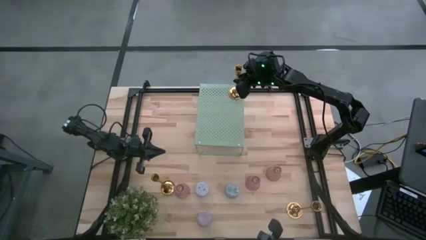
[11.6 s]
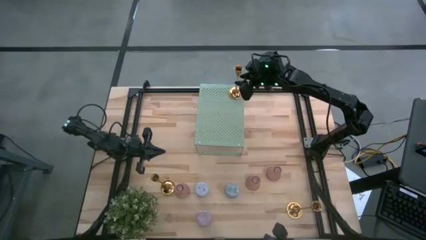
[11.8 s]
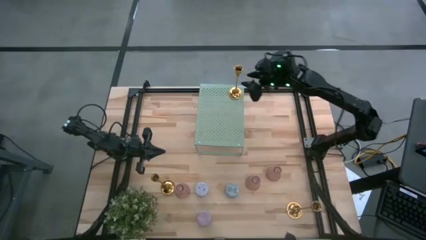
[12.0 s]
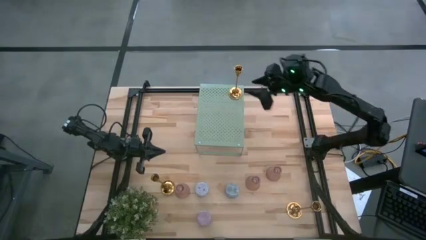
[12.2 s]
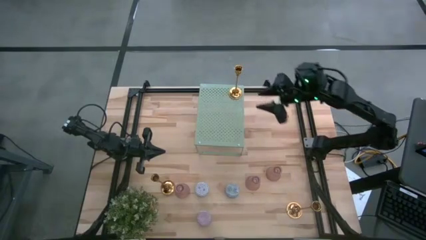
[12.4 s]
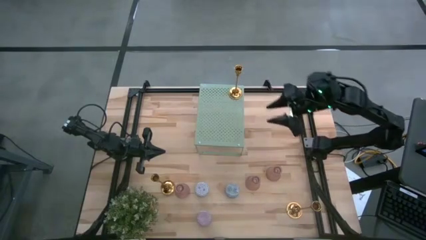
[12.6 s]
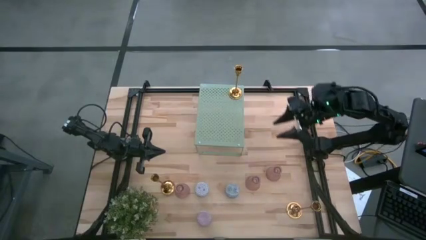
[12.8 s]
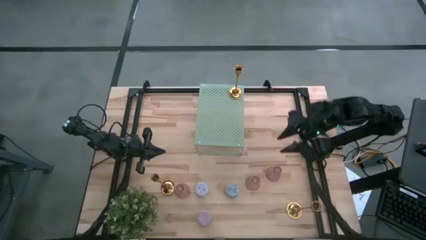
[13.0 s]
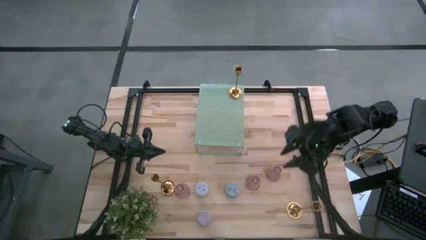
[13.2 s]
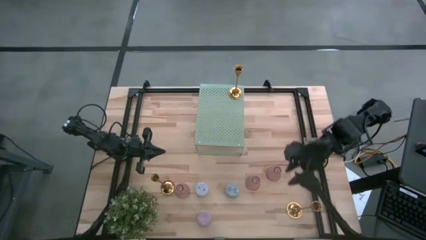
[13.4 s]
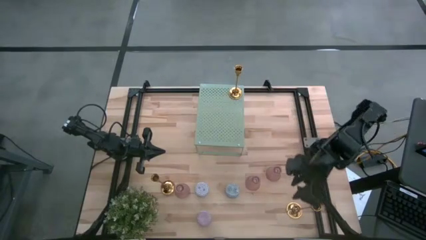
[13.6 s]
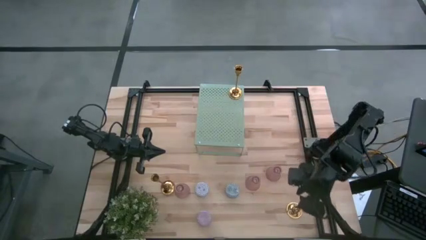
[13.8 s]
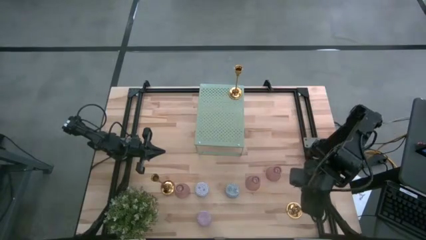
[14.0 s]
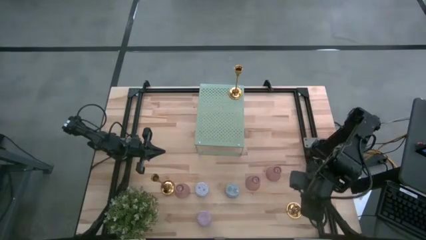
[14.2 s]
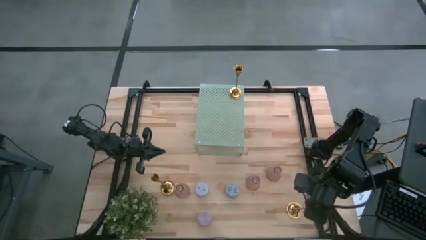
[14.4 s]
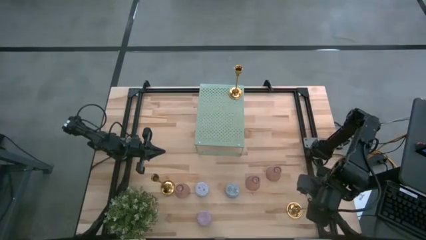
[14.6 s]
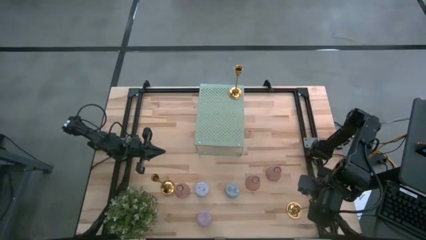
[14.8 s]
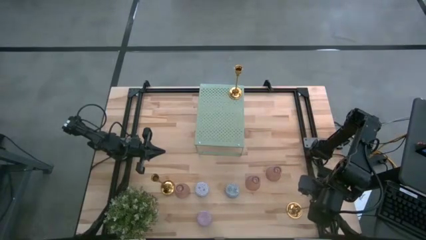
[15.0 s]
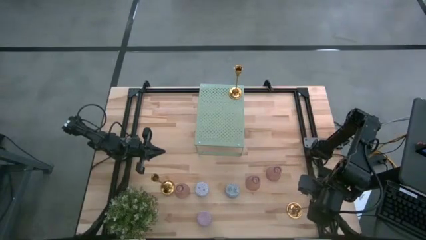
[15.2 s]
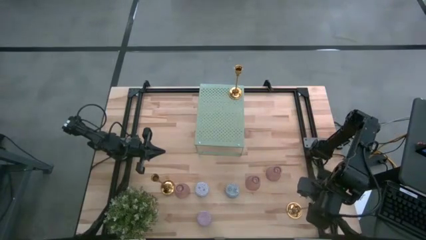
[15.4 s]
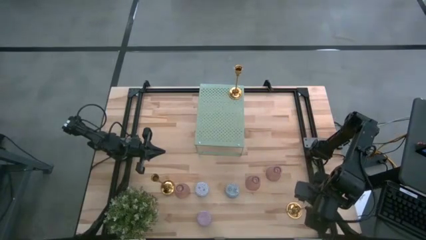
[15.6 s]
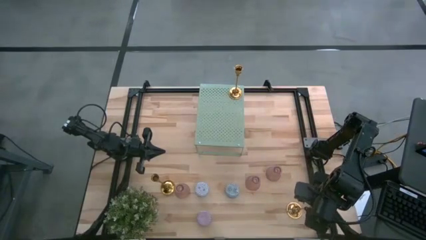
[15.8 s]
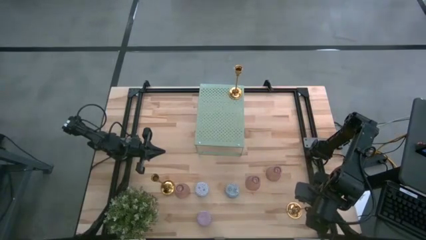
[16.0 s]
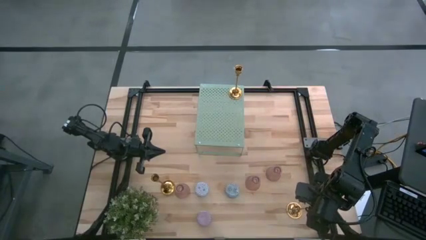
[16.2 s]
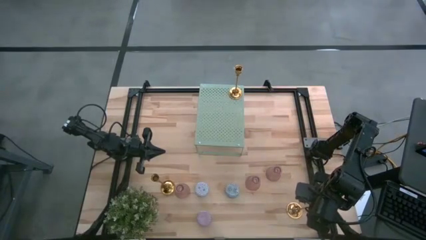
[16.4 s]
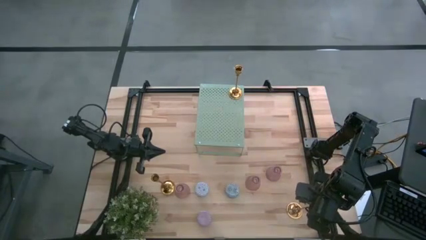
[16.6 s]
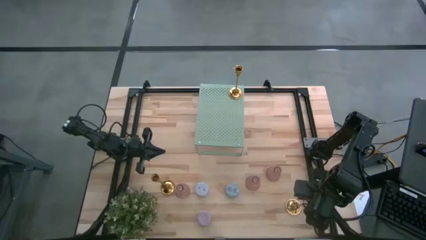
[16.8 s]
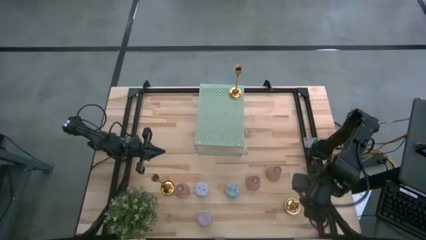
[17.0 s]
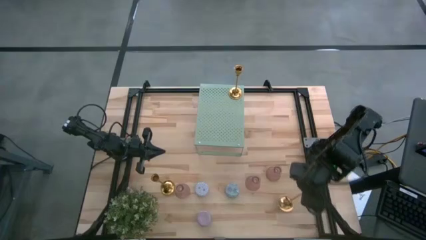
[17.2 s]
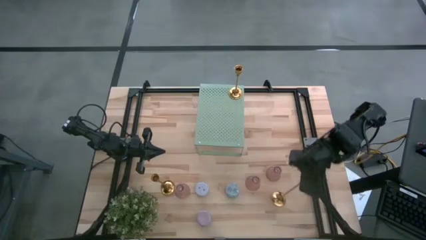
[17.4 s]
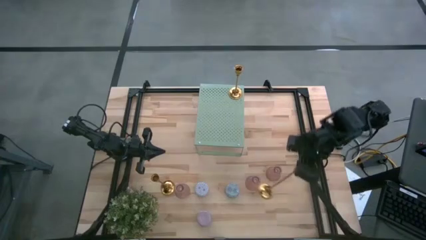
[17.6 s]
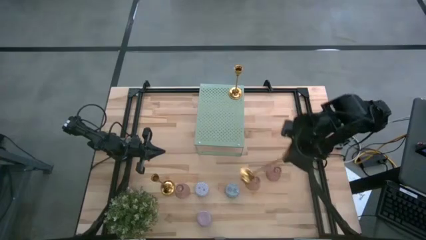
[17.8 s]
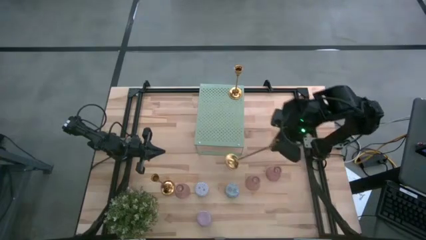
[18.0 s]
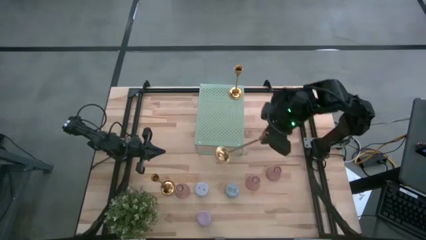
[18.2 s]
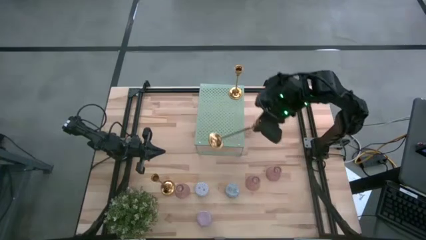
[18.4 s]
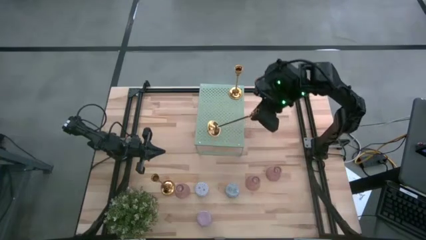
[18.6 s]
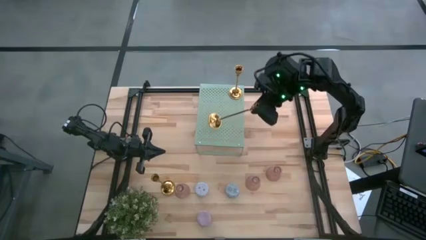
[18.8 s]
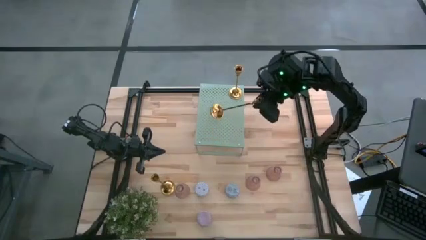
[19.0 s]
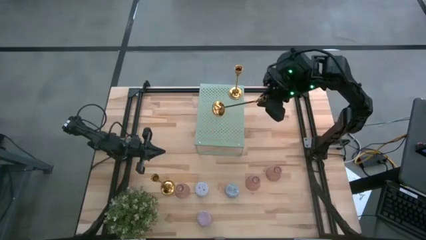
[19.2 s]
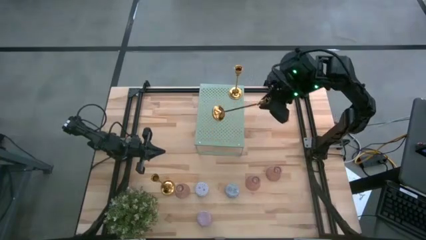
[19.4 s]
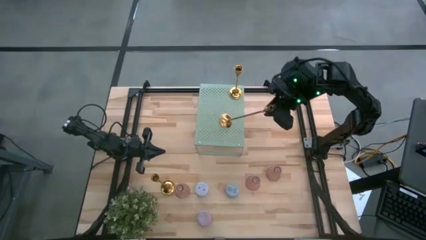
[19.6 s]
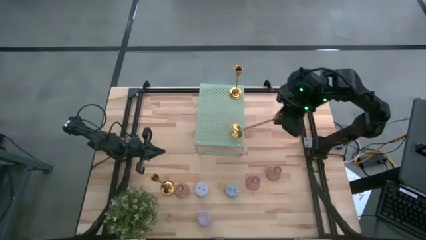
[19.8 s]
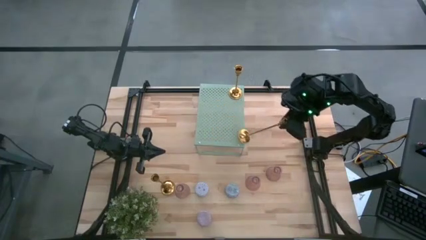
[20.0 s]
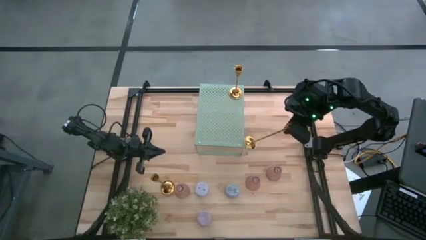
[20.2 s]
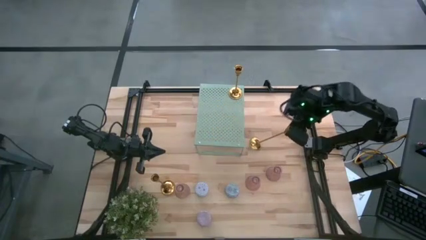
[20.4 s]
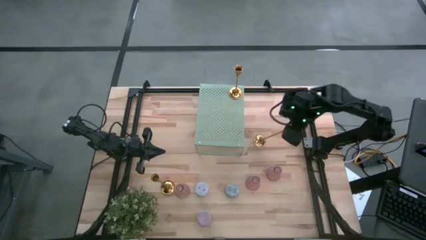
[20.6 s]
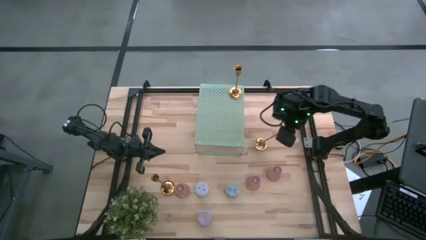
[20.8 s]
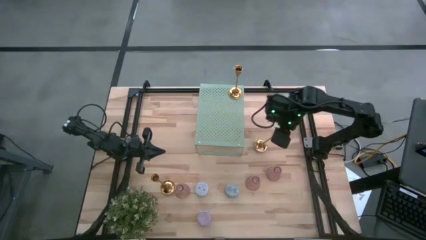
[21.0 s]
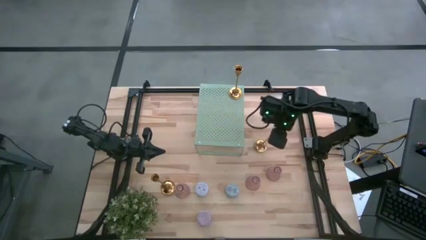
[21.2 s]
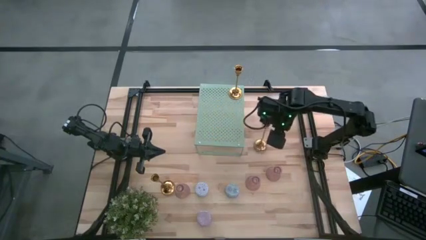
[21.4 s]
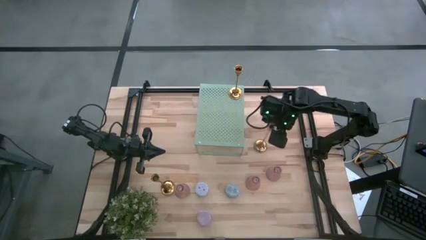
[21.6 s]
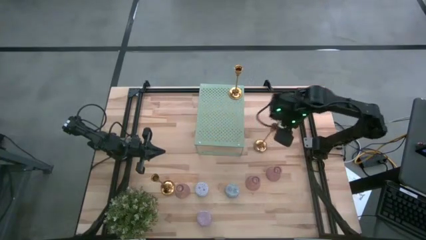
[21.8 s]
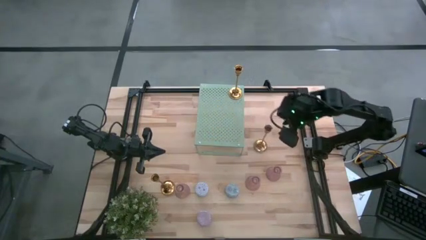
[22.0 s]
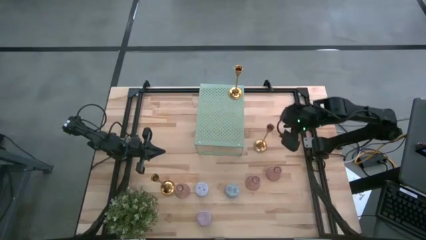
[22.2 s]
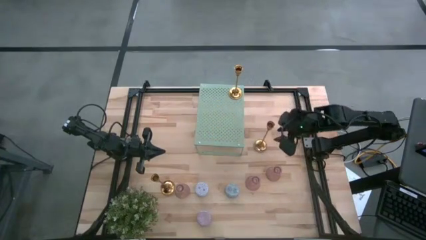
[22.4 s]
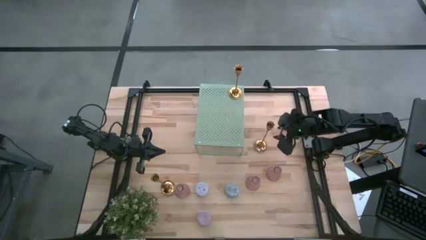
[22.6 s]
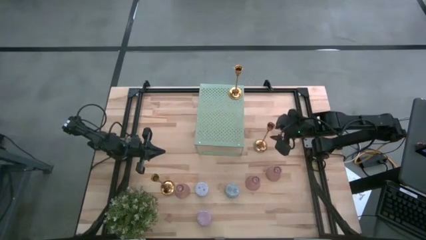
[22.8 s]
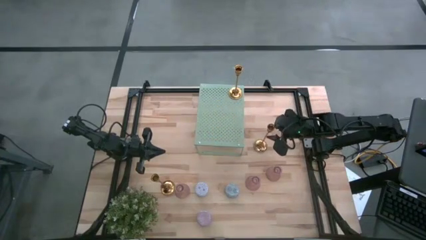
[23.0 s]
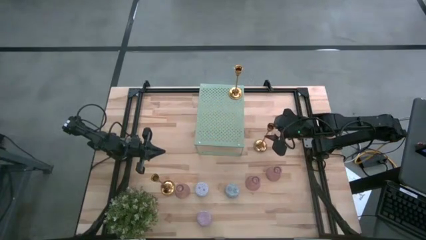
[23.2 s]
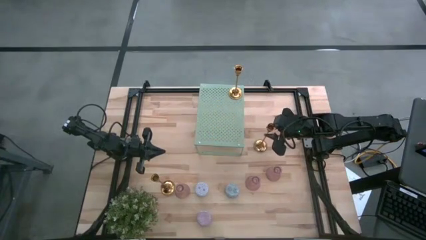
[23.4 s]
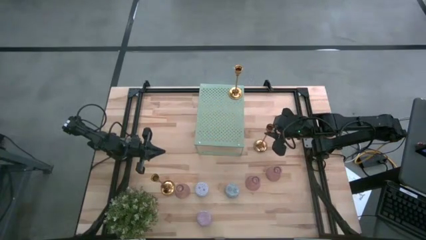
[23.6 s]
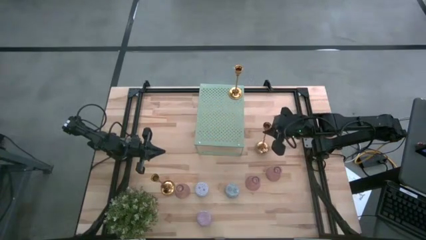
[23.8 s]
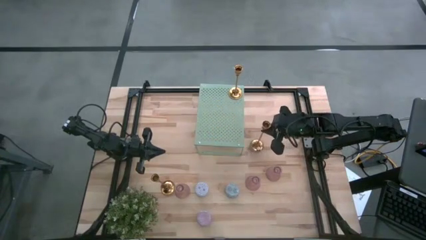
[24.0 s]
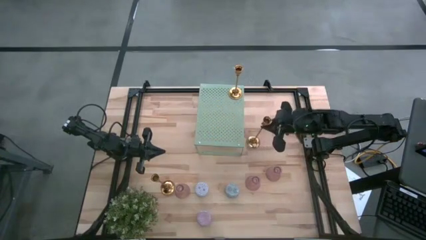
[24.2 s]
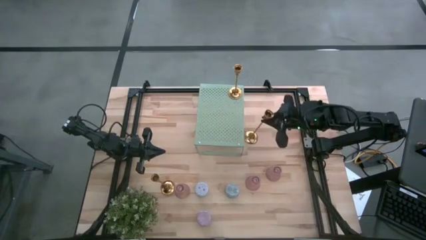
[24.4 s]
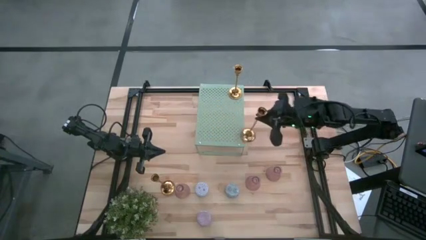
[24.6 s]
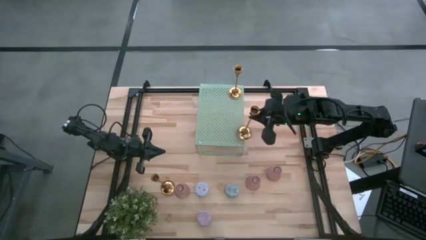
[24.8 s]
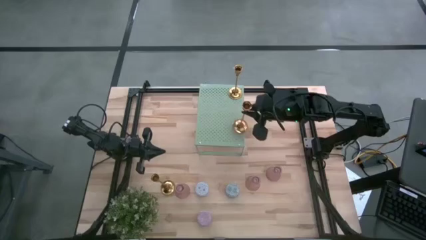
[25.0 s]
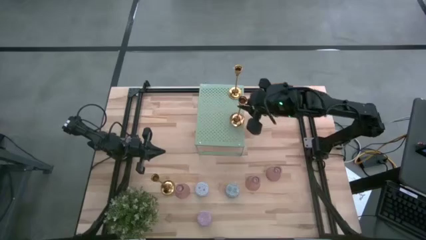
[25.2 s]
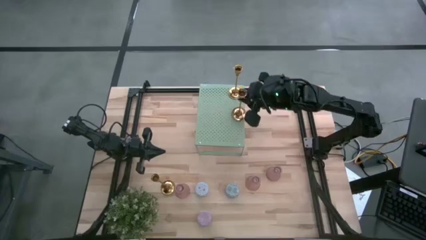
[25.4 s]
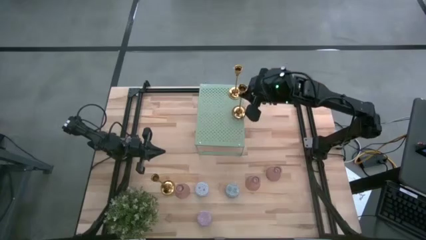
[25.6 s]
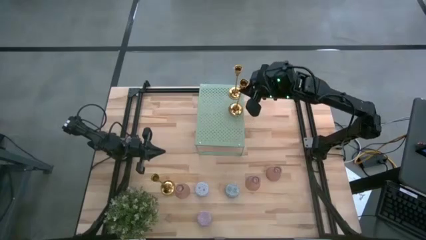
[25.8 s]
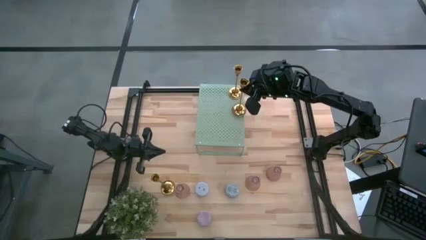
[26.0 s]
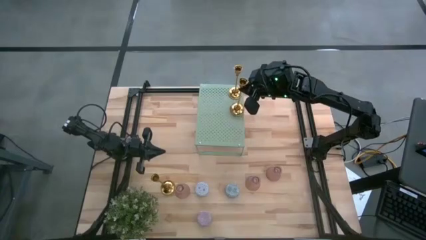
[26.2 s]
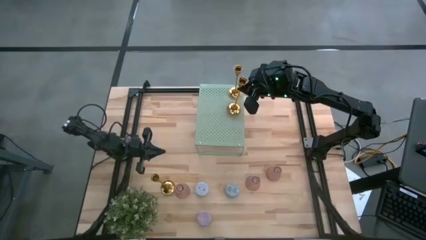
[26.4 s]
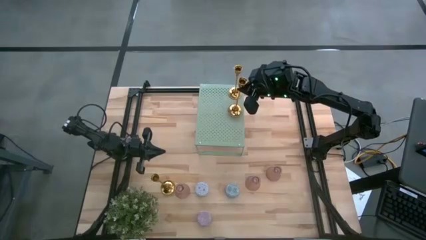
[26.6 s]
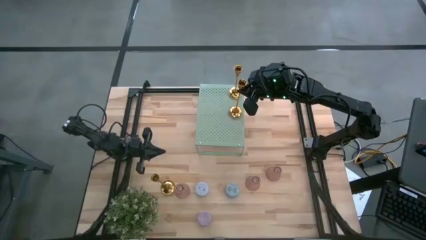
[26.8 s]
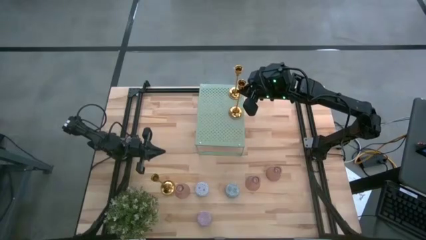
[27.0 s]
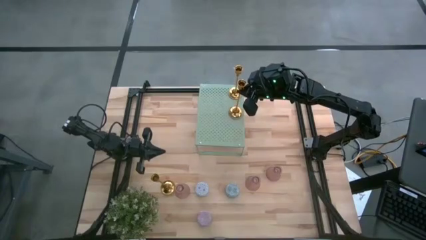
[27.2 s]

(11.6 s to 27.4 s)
Task: Pick & Place candle stick holders
Put the right gold candle holder on the shelf aligned with other gold candle holder
